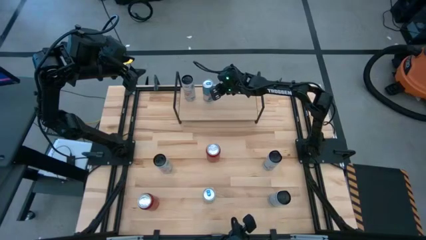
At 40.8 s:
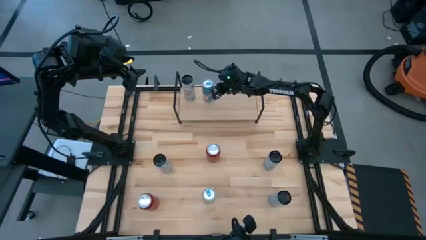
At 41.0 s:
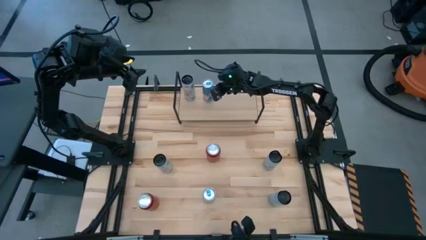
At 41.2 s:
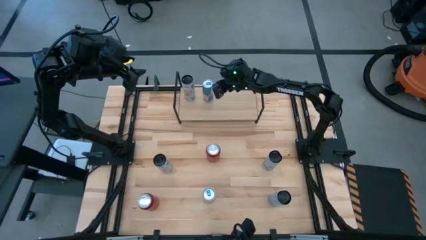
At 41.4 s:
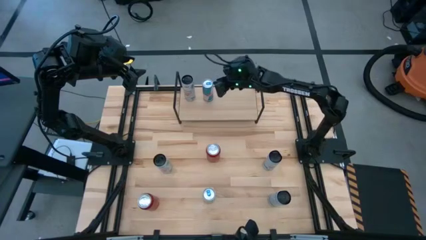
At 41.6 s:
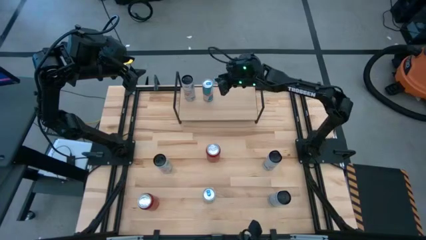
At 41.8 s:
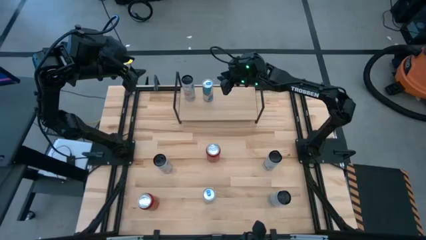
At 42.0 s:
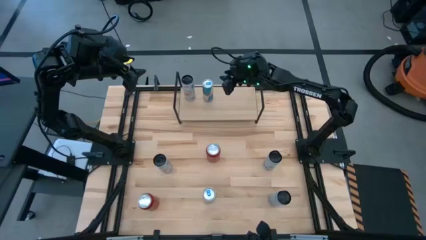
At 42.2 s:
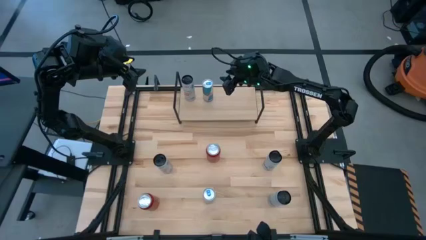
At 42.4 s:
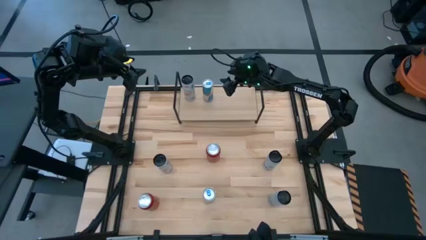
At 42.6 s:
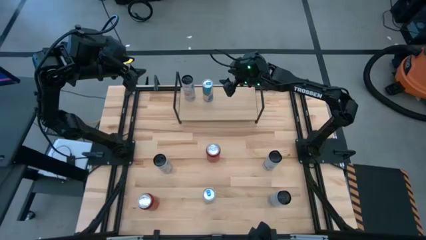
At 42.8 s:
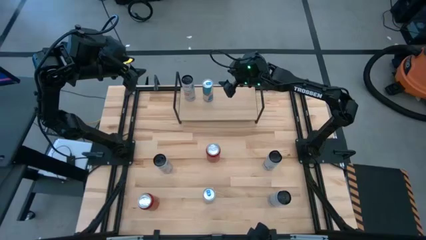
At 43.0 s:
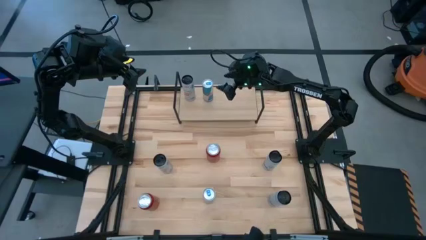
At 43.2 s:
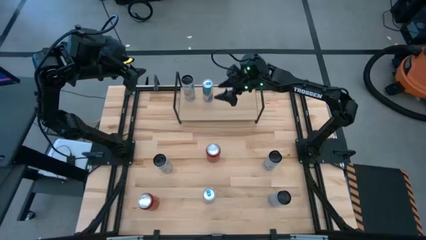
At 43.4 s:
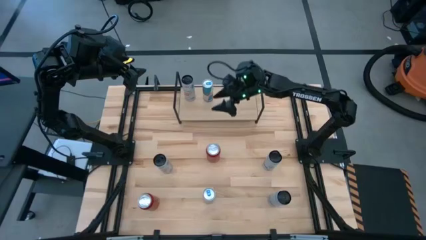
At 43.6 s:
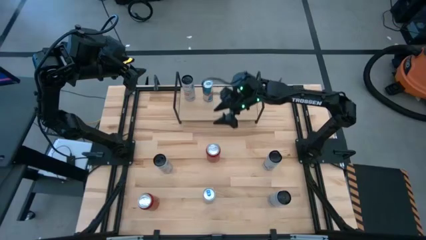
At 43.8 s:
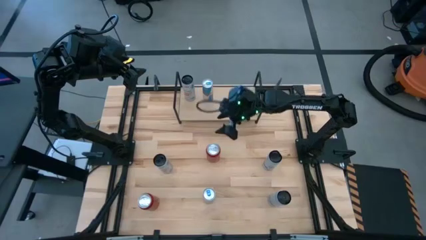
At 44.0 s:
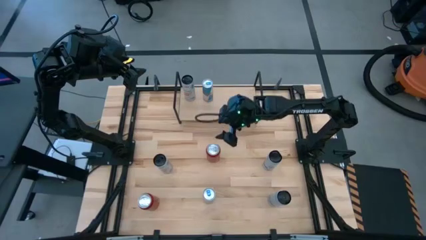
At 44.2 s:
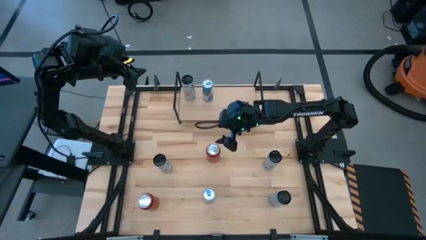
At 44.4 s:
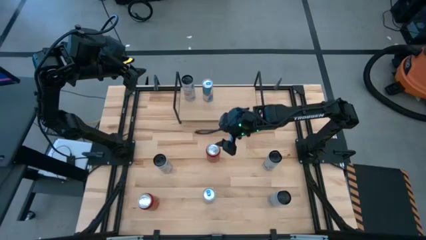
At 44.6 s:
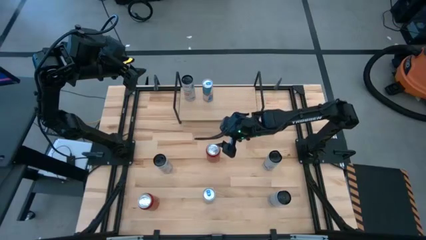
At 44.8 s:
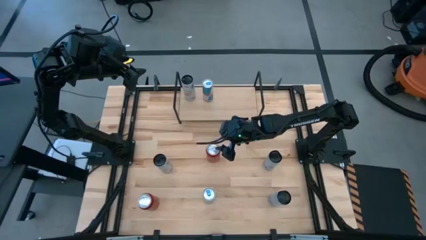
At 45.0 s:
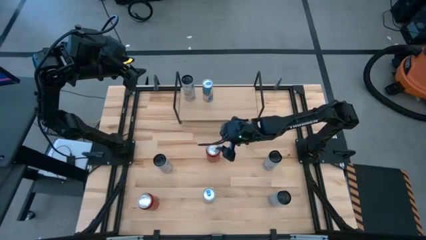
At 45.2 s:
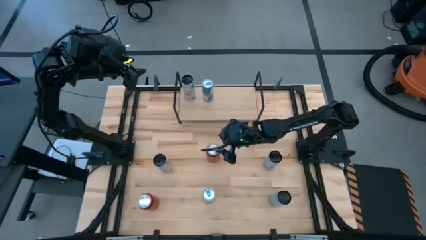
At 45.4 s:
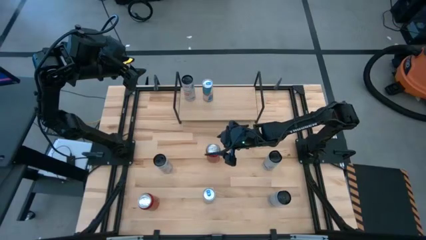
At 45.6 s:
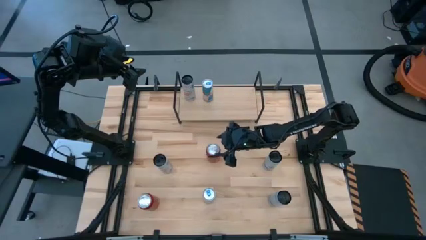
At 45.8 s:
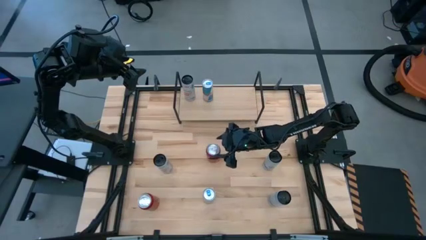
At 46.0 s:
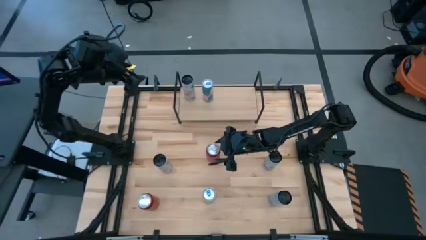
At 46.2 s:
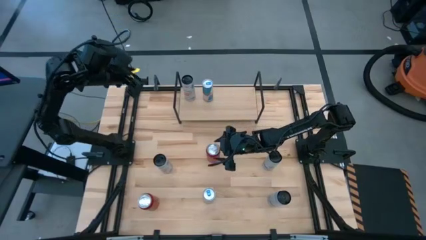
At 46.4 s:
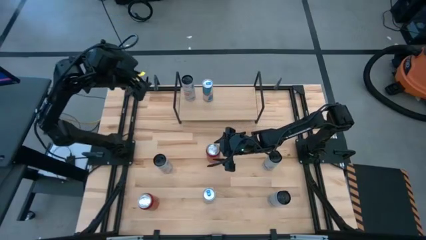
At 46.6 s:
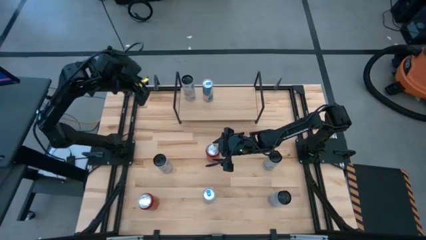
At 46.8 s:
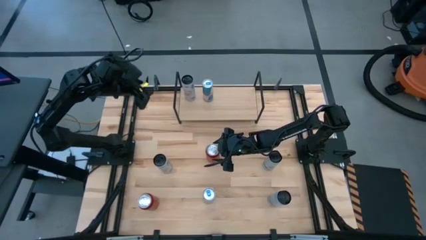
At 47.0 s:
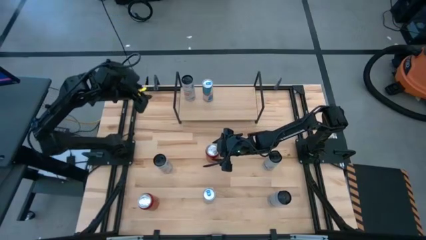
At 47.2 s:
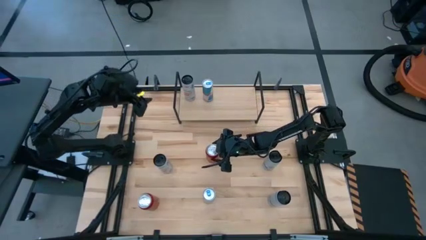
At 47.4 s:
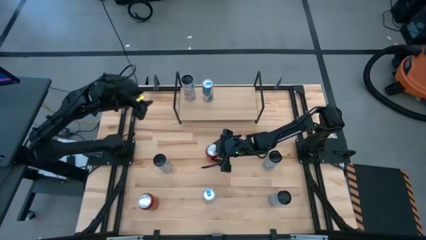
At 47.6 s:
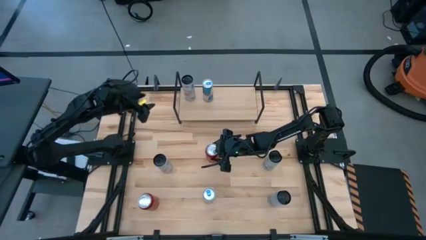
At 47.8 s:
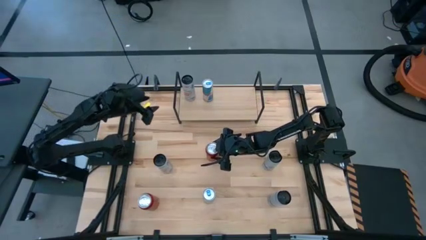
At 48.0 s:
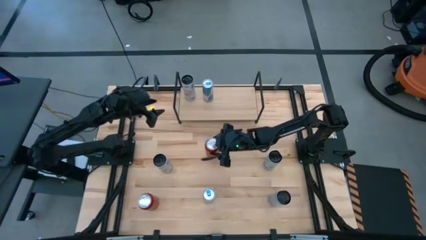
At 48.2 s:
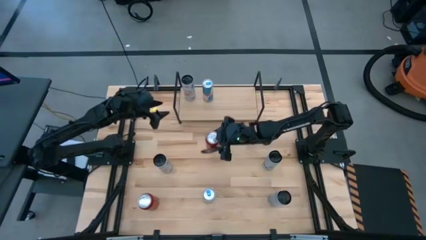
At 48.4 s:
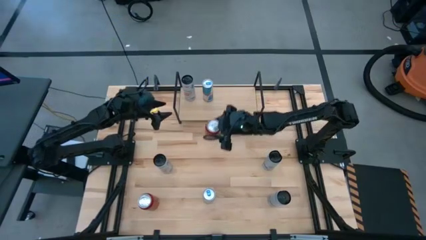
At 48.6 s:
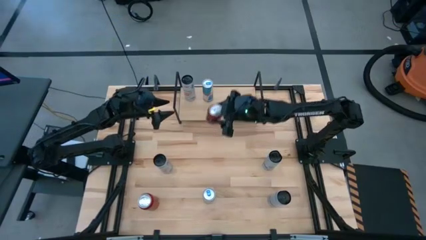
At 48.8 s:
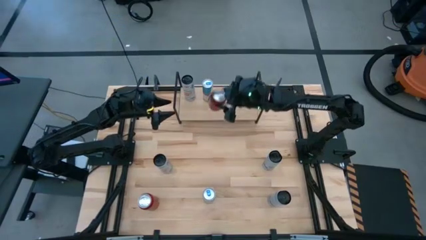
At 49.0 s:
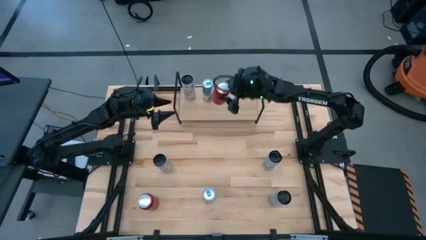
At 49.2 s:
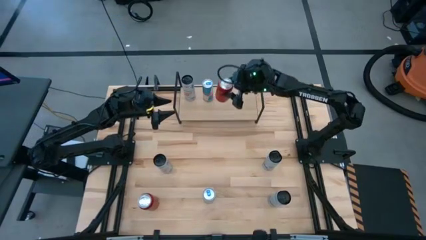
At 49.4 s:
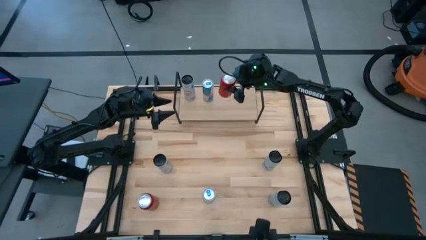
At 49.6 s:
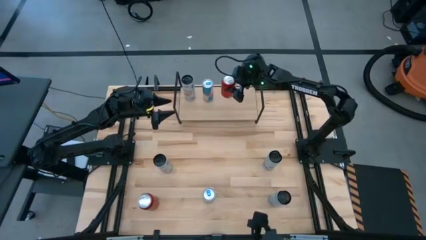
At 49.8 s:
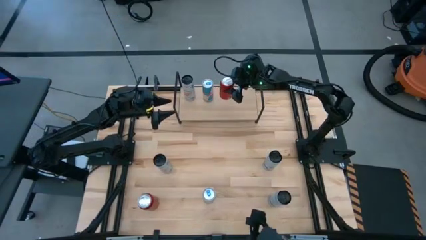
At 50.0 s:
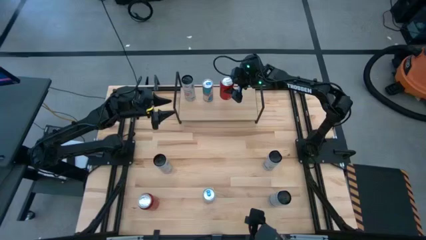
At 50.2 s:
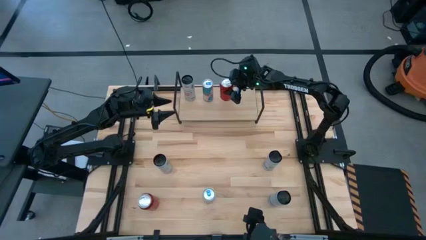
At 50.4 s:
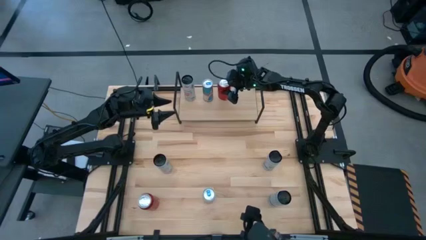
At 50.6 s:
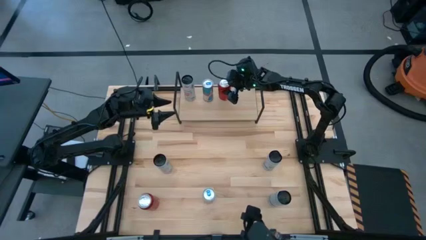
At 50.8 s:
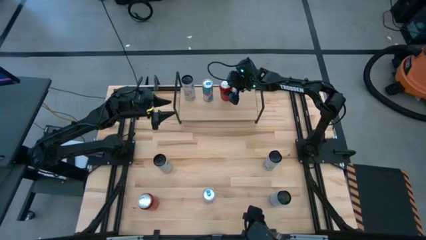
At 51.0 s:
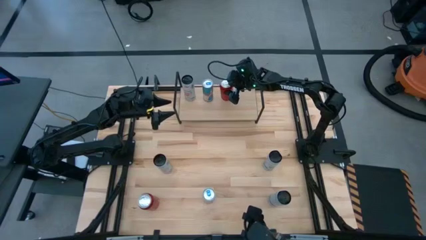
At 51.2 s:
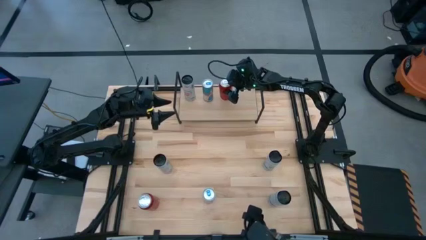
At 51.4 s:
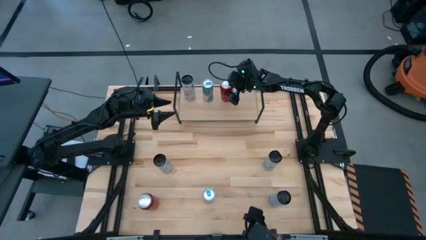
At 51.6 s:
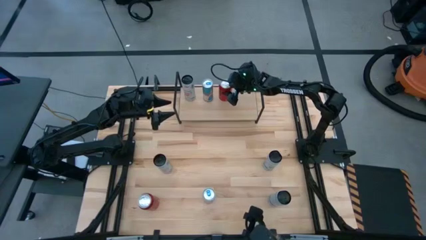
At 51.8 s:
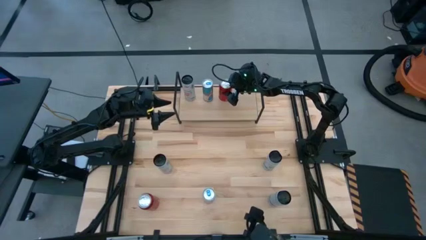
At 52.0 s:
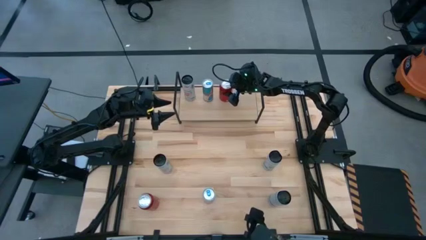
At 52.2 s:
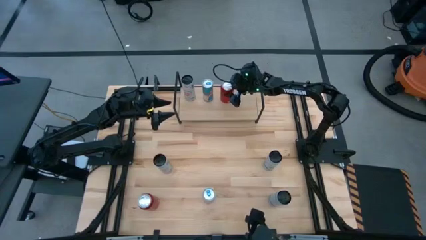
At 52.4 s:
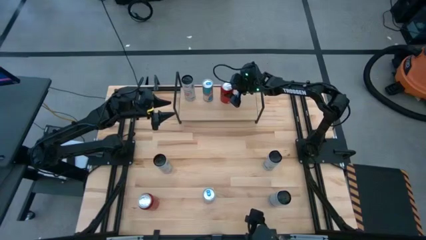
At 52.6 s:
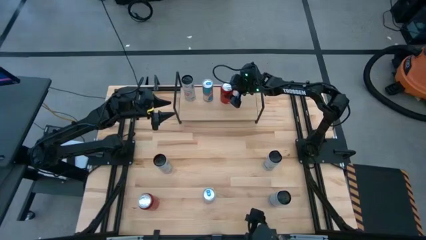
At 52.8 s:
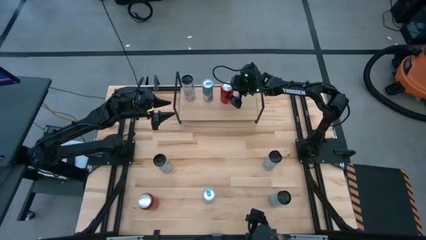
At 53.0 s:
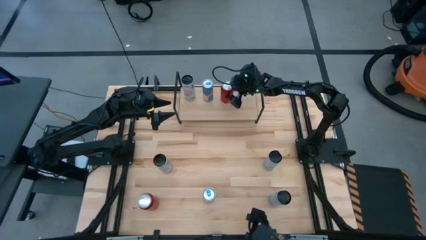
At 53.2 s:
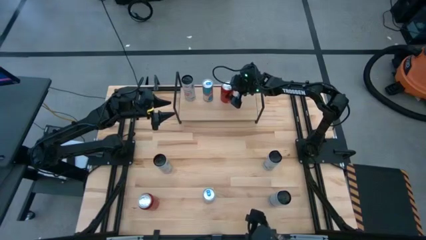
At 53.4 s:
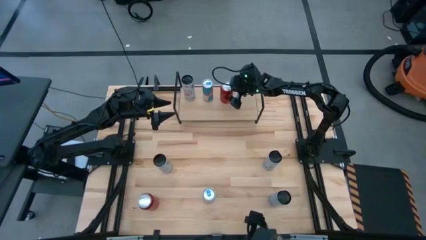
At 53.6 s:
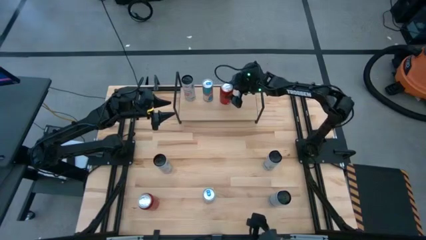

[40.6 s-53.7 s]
Task: Place canned beverage on shelf
Put the right red-black soda can on the shelf
